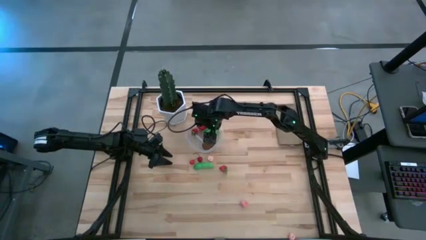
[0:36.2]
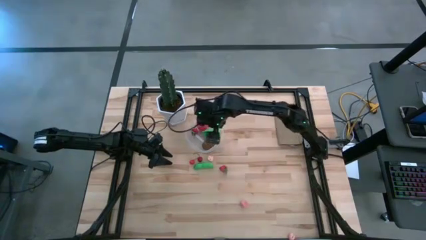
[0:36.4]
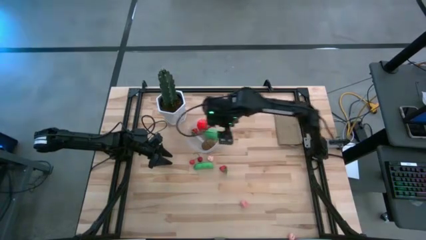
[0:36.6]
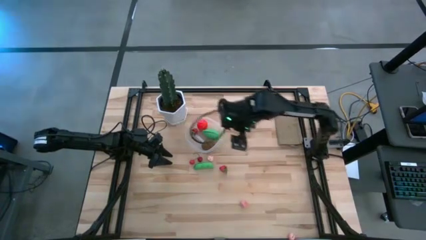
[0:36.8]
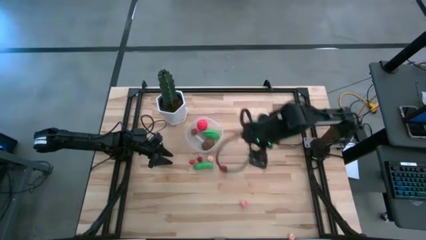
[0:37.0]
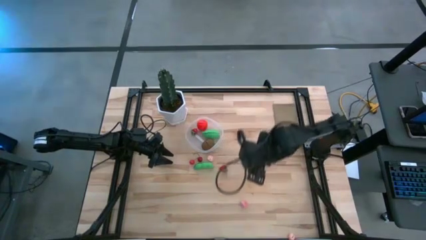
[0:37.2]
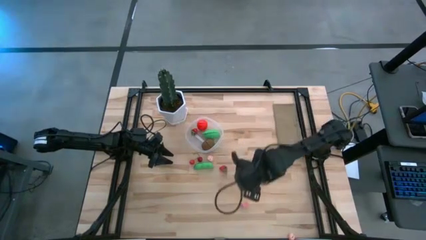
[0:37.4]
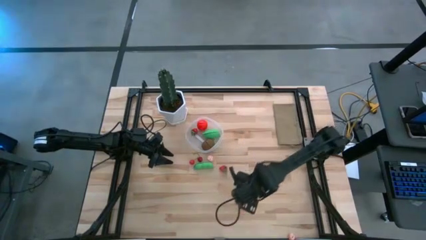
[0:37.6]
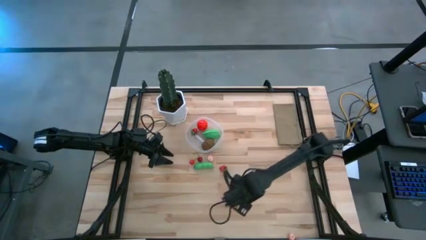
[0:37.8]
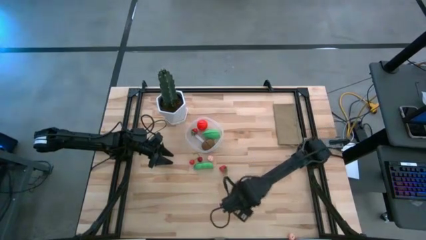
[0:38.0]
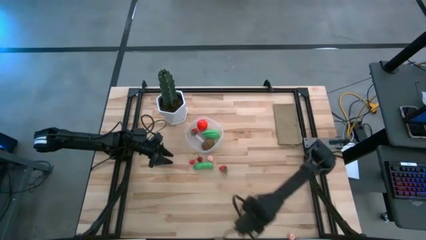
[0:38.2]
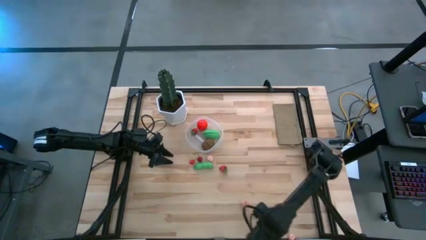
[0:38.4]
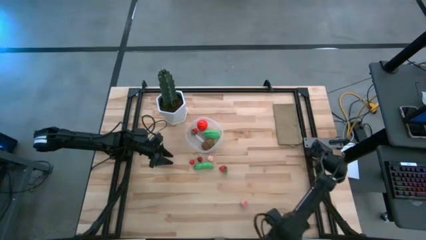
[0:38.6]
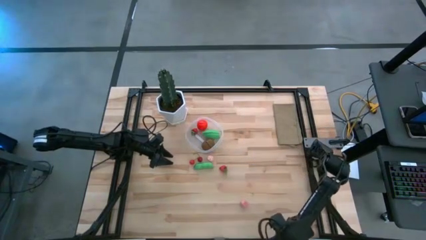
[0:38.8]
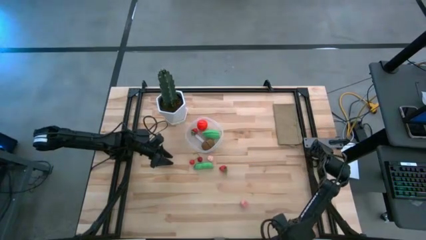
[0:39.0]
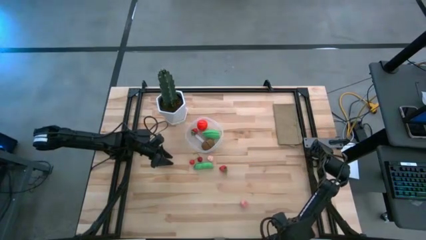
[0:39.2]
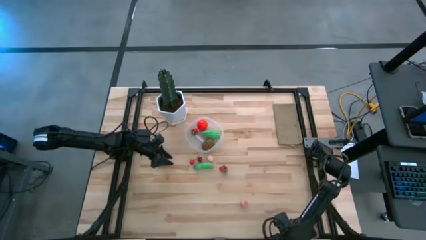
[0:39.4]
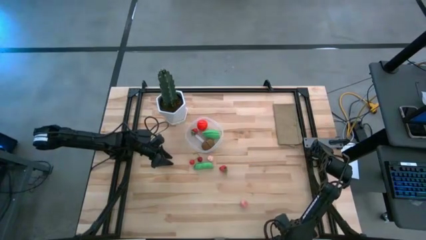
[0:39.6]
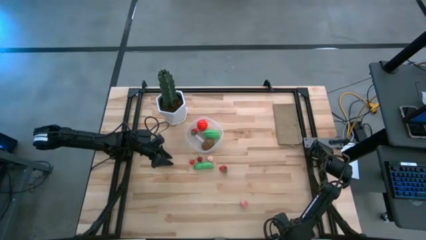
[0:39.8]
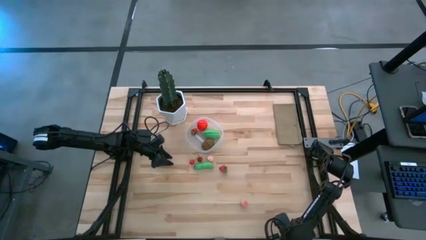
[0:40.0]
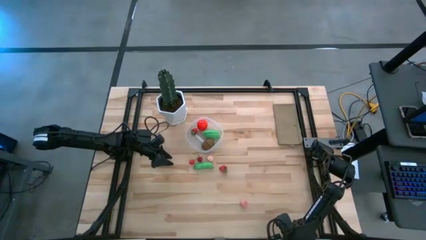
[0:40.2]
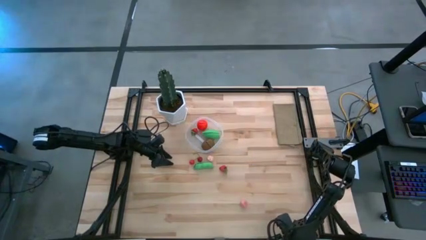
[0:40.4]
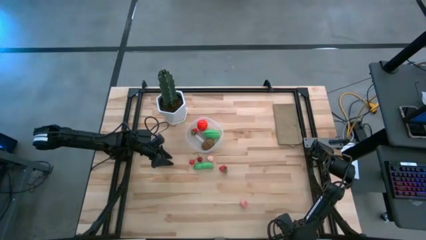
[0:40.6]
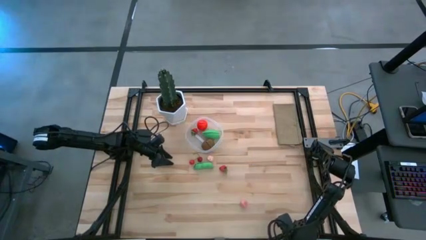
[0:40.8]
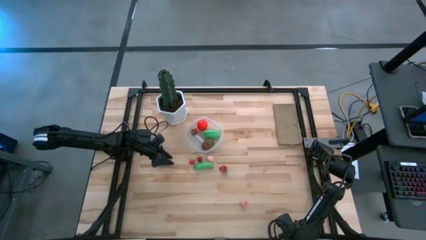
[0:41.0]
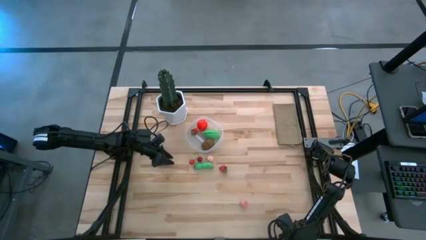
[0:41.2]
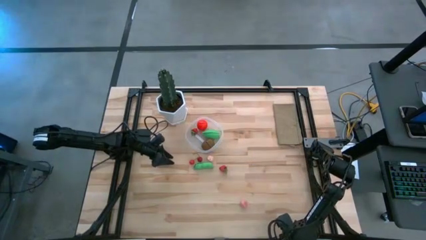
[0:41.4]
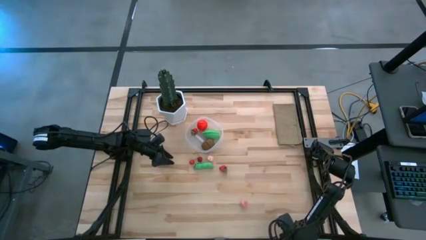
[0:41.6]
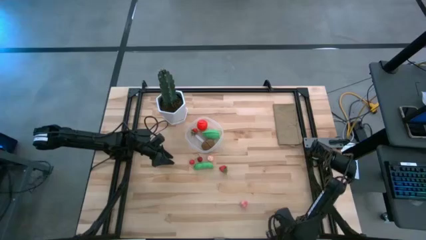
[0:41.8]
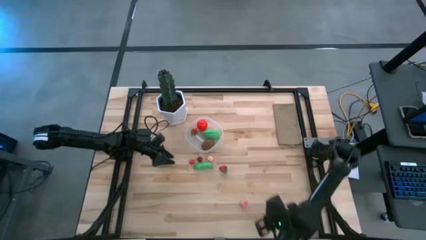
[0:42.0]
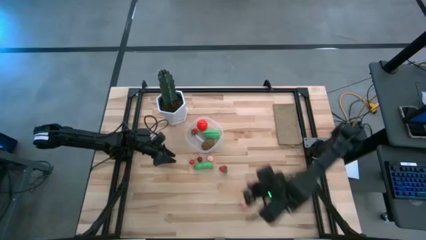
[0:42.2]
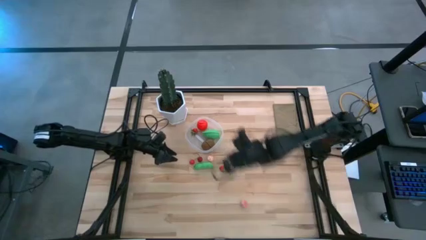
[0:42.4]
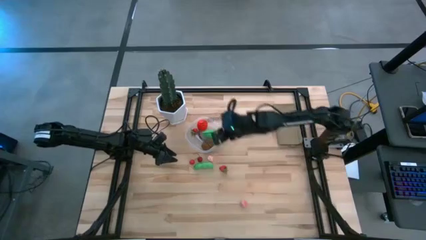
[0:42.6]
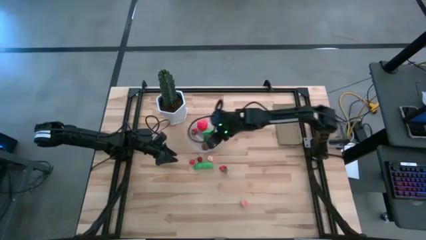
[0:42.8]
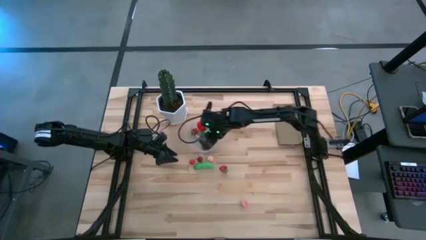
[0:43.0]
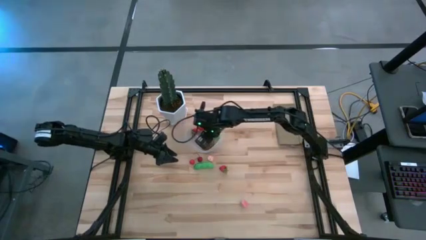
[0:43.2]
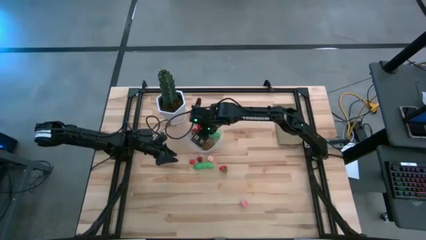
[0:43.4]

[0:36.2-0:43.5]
Task: Pick and placing Produce into tupperware
Put the bottom peach into the transparent bin

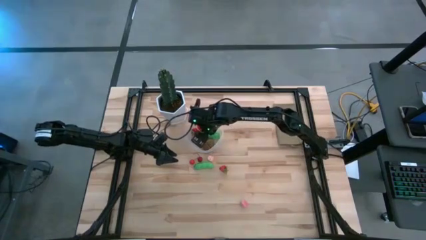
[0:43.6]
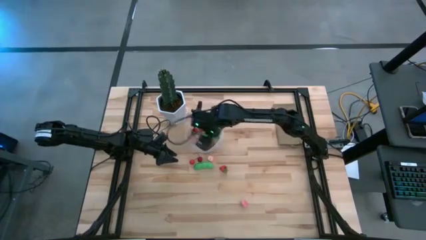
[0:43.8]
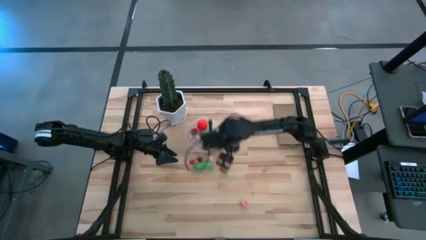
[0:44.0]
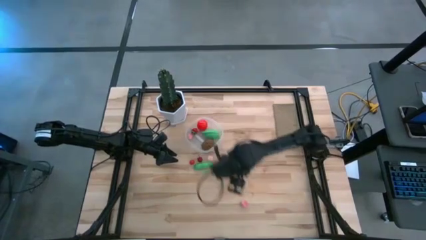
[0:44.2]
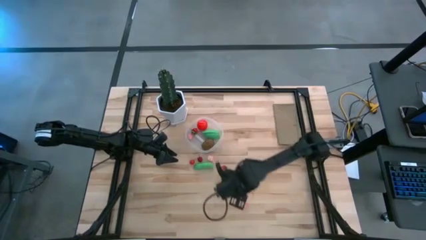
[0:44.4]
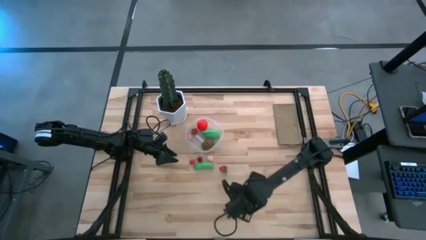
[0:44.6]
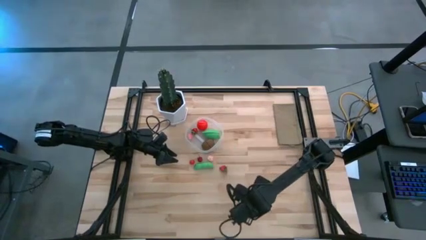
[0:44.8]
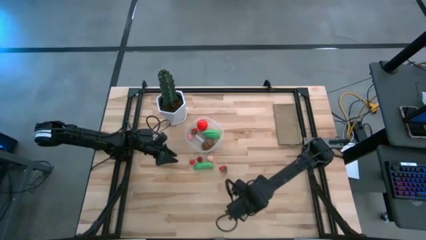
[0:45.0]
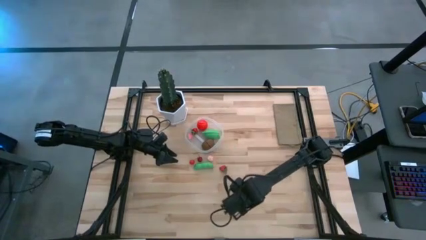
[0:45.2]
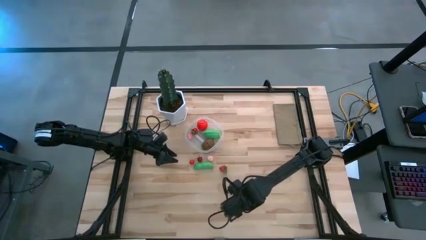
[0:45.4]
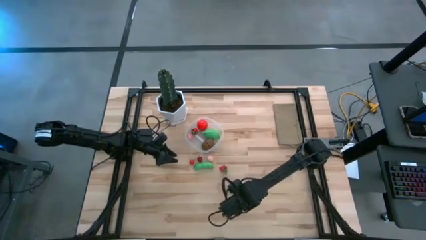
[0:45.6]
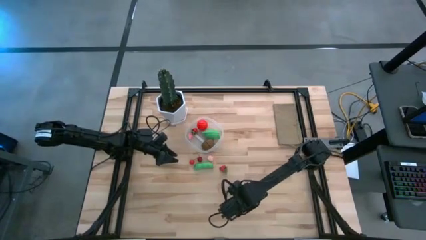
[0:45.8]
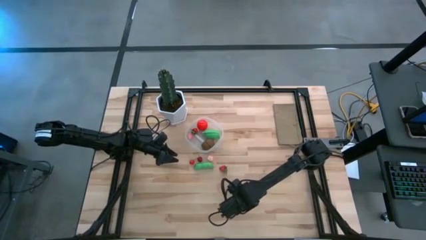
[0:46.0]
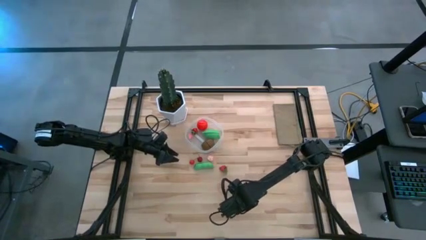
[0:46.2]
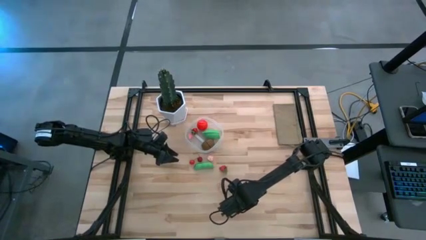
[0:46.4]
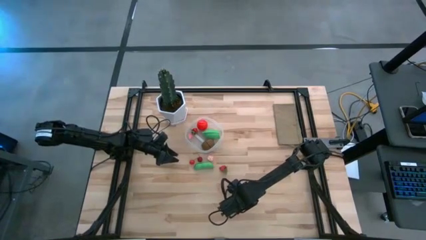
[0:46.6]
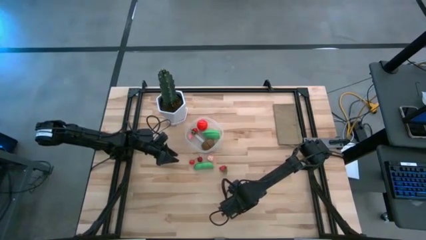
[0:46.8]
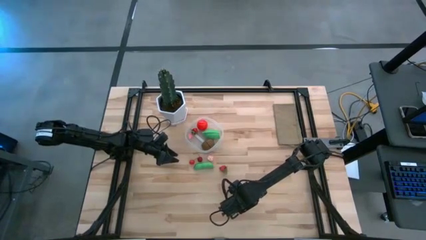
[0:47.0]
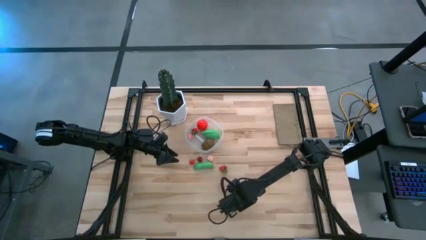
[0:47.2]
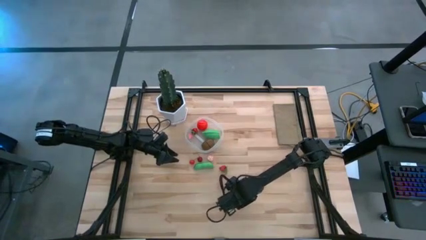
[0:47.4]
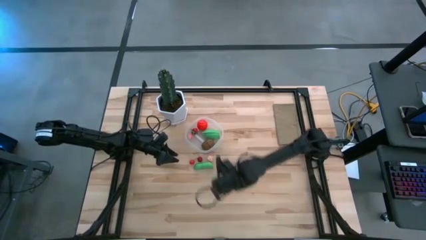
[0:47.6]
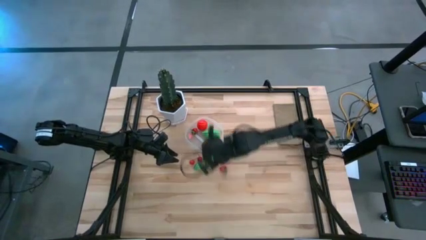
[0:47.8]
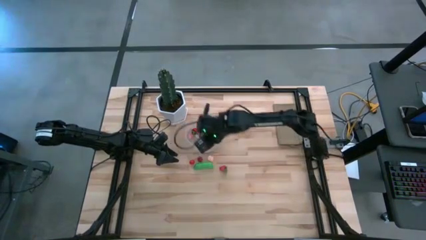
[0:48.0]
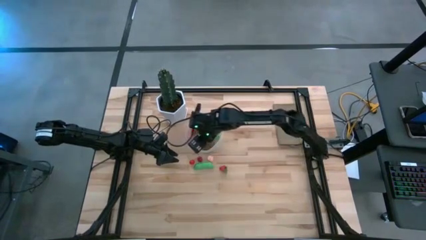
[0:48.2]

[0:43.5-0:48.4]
Put the bottom peach into the transparent bin

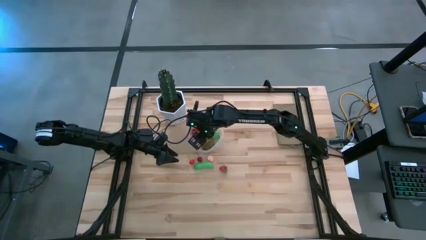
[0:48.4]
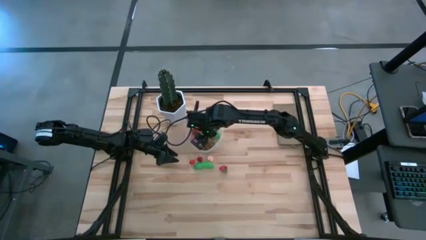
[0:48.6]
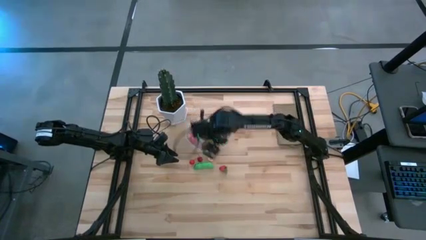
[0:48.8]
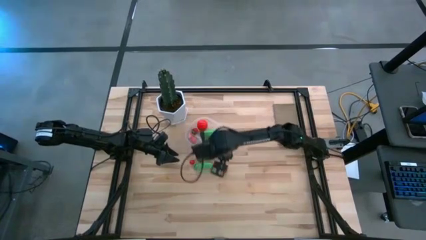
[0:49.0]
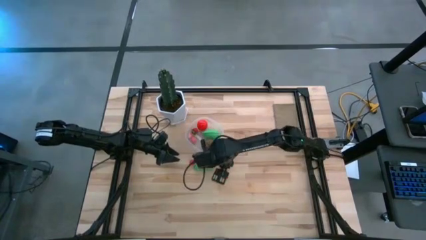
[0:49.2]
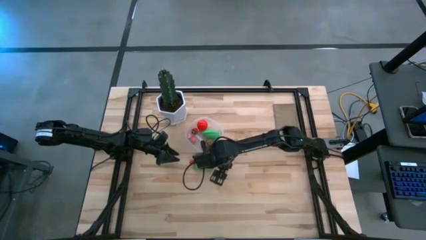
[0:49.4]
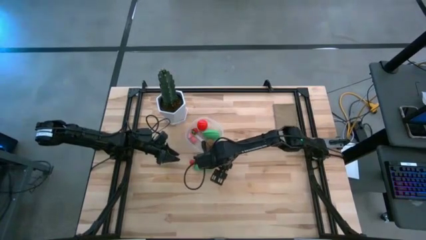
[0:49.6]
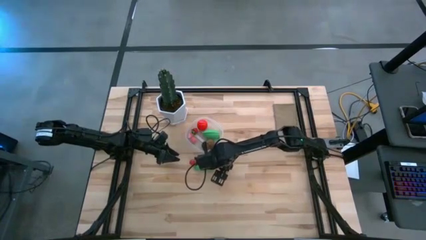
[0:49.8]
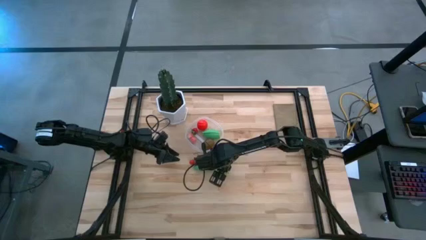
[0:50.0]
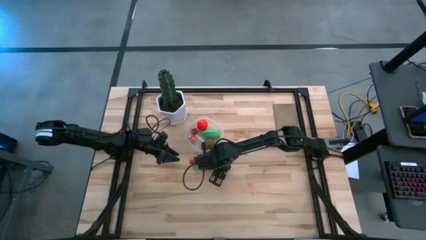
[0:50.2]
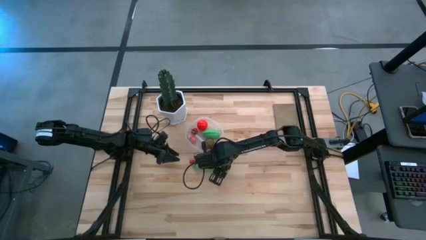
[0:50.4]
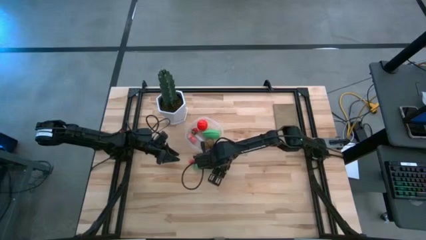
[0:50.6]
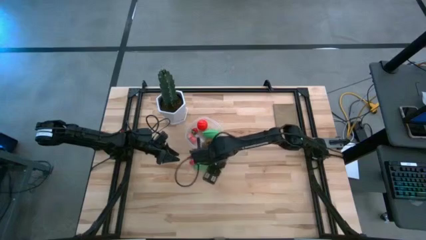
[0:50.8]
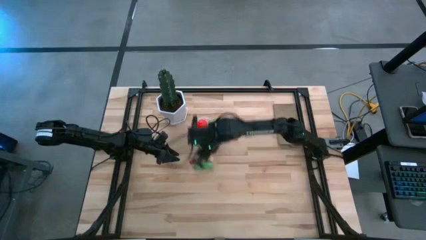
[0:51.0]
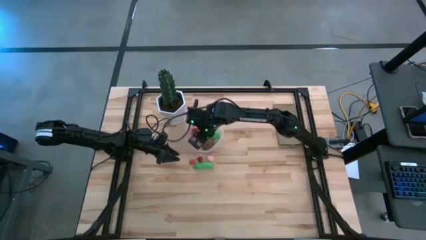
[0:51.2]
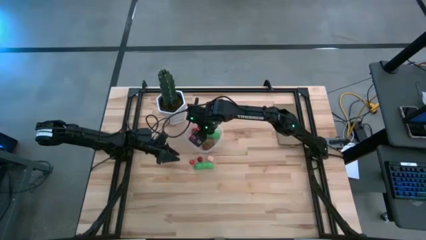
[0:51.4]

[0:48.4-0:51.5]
Put the strawberry into the transparent bin

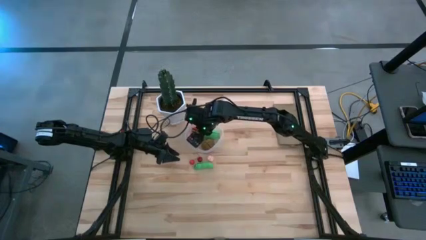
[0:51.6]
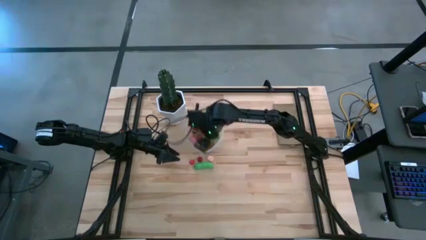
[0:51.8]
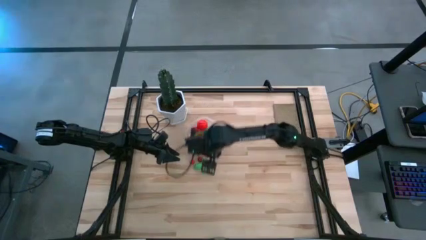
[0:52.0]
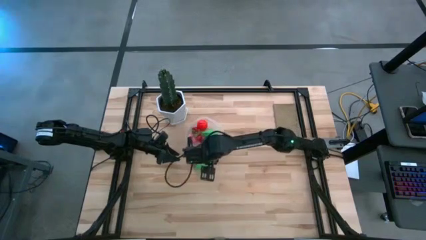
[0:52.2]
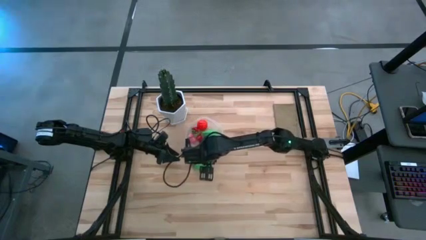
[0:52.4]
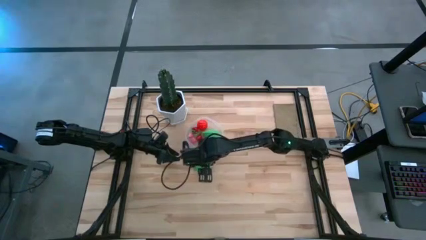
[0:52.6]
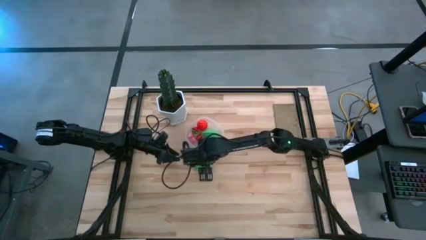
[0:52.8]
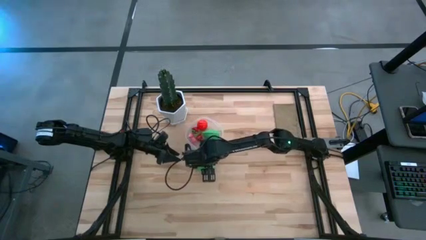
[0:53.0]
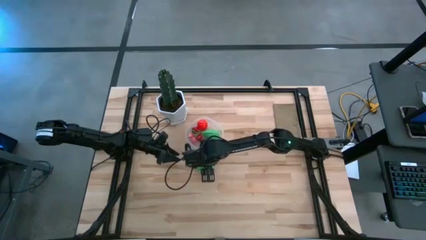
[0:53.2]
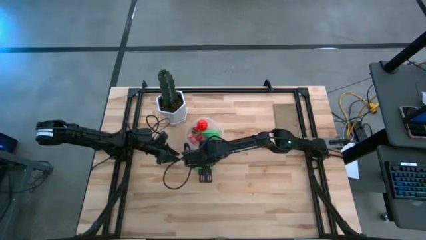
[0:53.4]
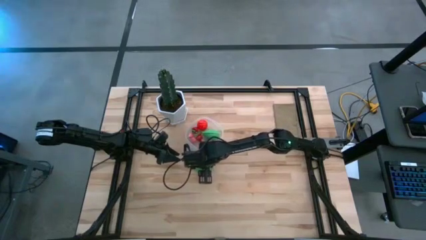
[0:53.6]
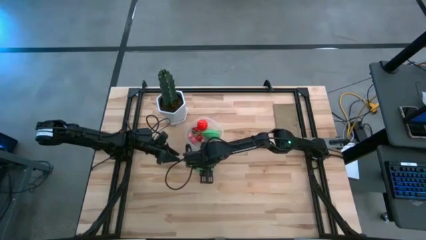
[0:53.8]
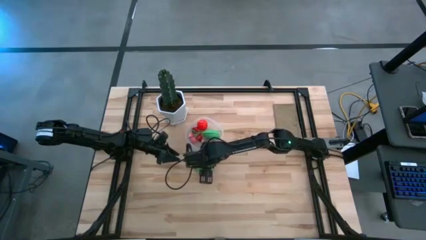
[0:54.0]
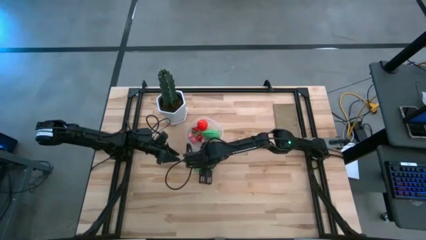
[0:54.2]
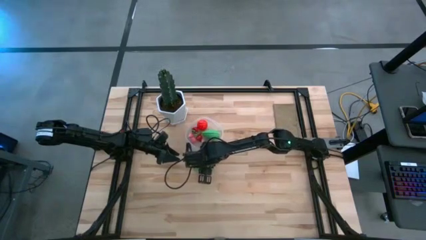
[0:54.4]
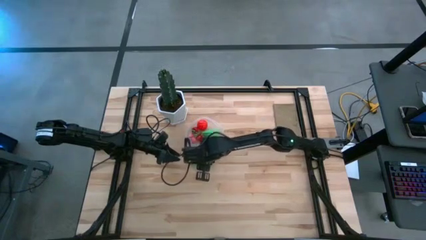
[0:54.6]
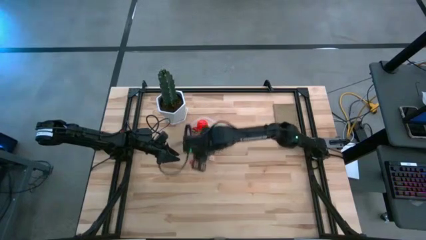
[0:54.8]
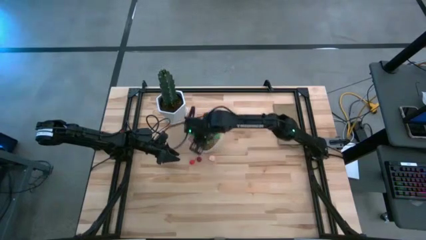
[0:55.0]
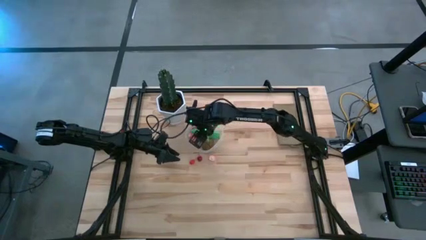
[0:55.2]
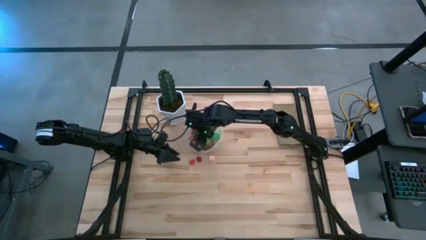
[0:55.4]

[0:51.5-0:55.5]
Put the green peas into the transparent bin
